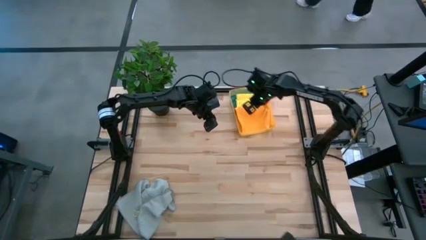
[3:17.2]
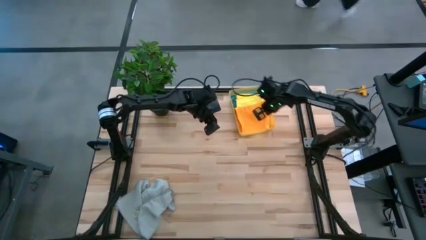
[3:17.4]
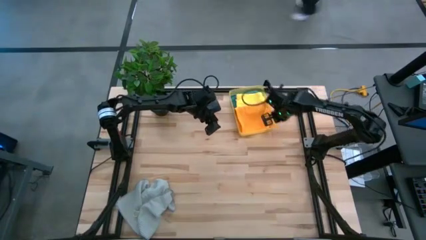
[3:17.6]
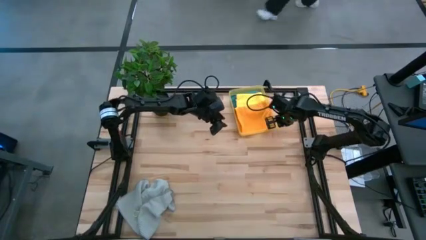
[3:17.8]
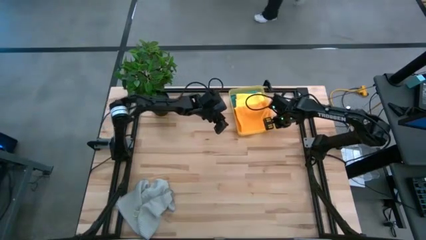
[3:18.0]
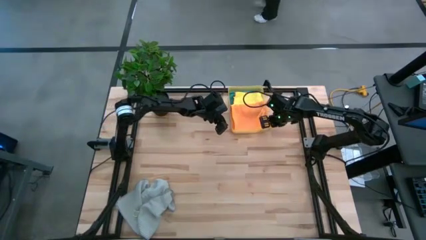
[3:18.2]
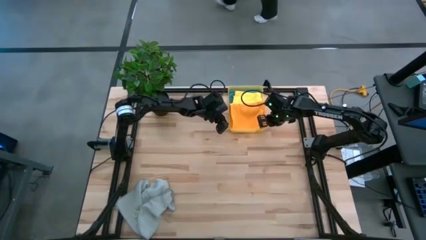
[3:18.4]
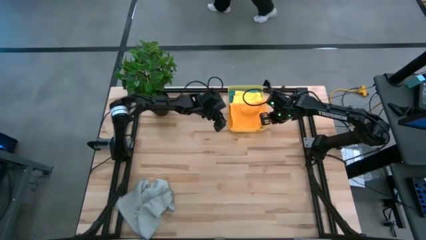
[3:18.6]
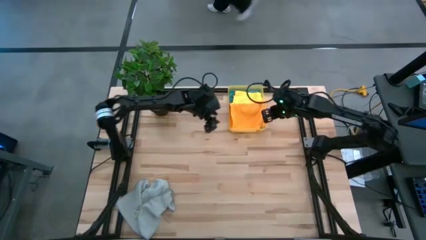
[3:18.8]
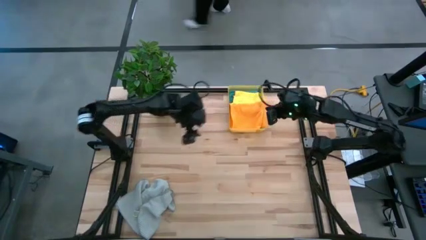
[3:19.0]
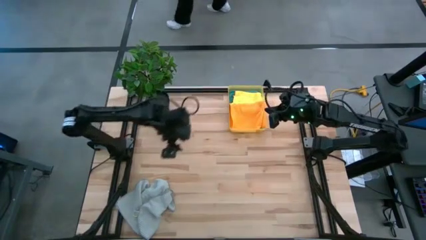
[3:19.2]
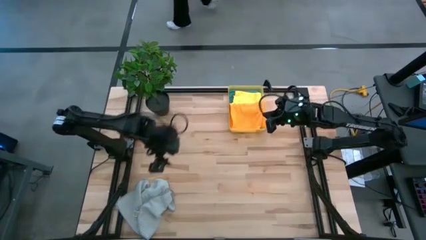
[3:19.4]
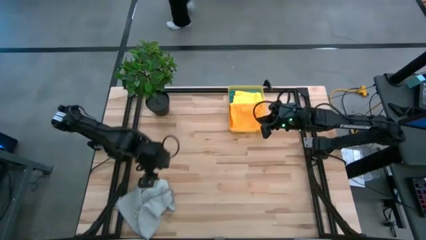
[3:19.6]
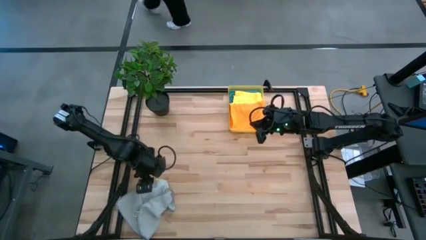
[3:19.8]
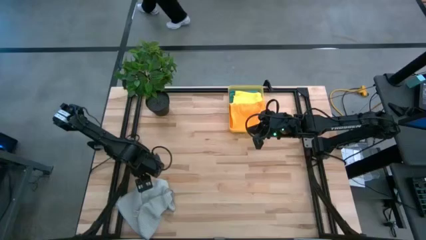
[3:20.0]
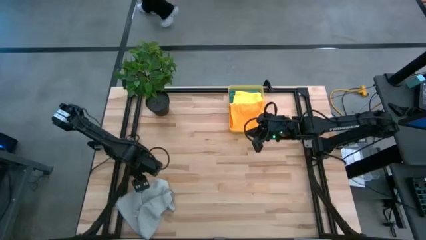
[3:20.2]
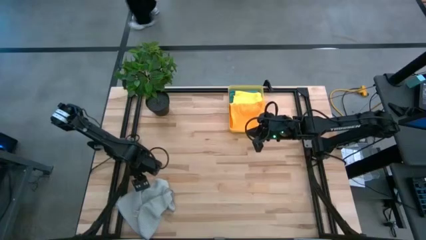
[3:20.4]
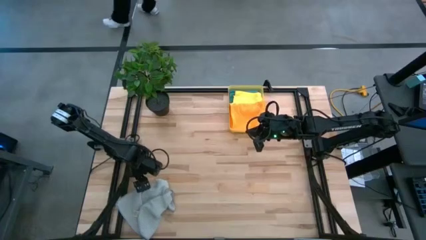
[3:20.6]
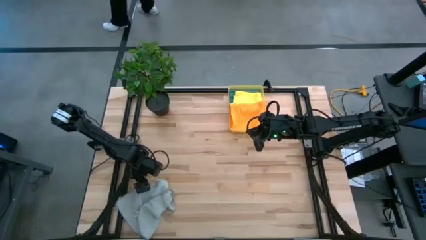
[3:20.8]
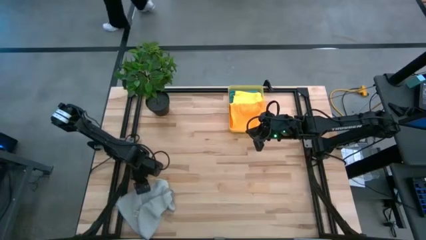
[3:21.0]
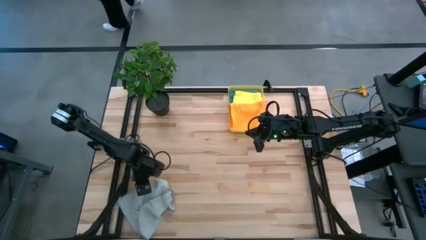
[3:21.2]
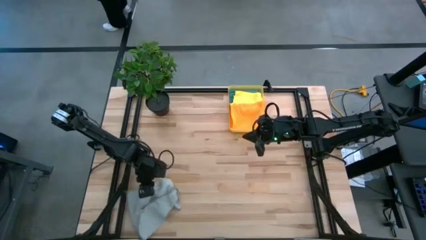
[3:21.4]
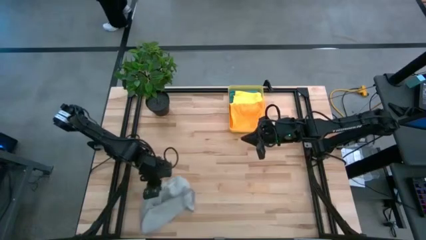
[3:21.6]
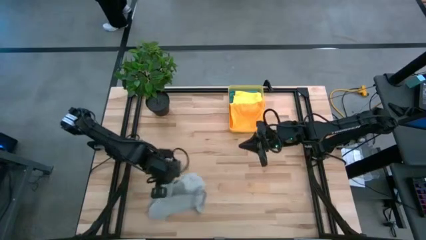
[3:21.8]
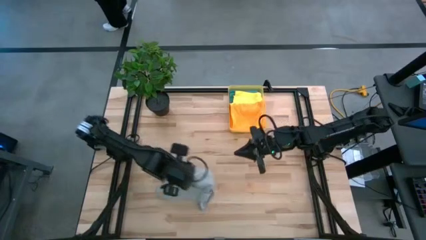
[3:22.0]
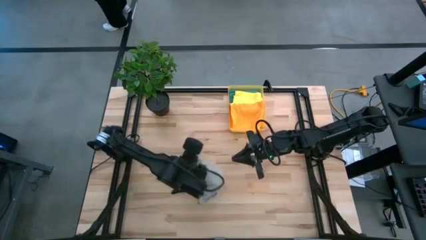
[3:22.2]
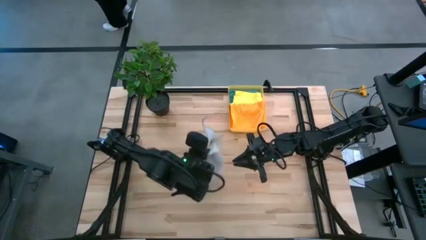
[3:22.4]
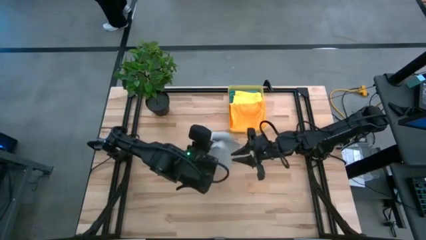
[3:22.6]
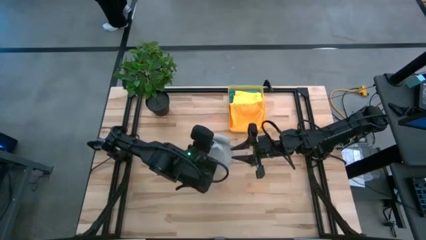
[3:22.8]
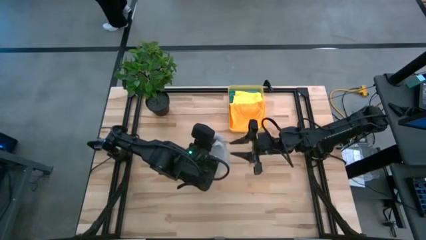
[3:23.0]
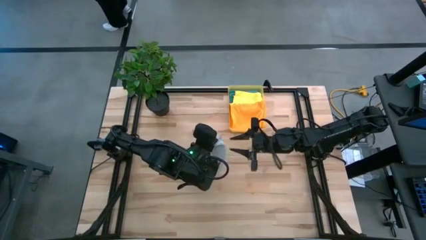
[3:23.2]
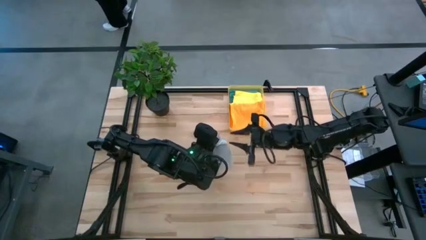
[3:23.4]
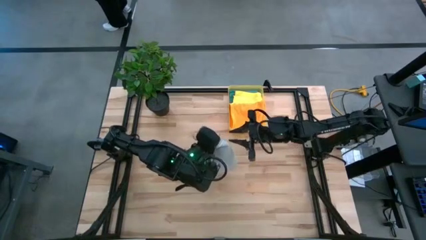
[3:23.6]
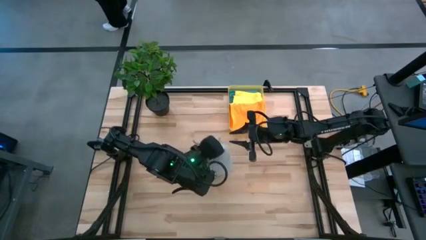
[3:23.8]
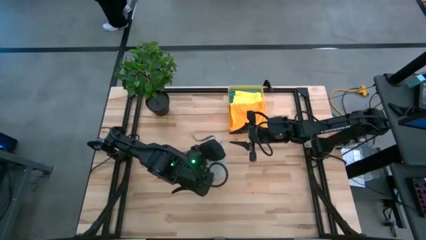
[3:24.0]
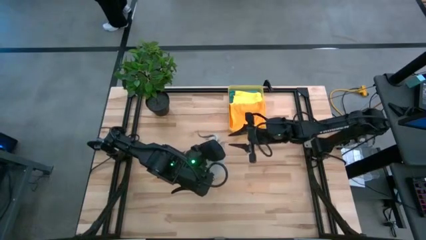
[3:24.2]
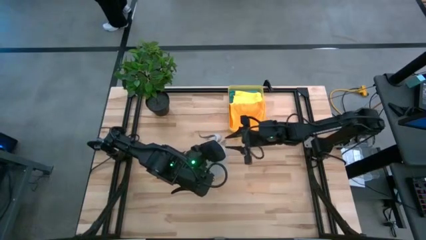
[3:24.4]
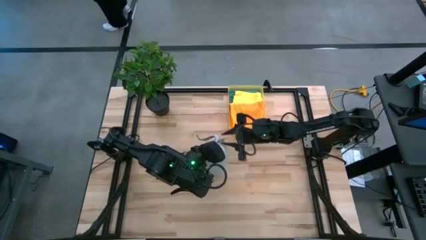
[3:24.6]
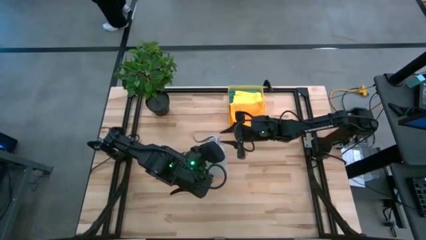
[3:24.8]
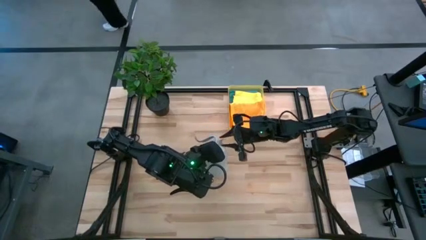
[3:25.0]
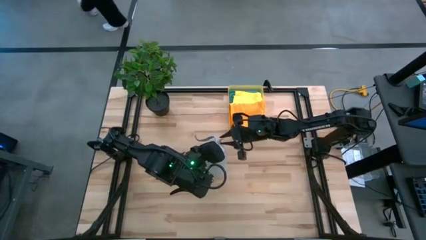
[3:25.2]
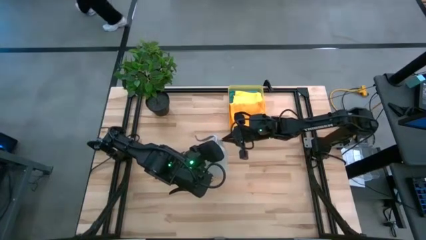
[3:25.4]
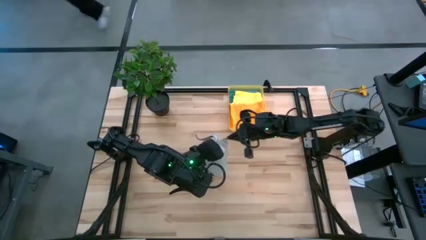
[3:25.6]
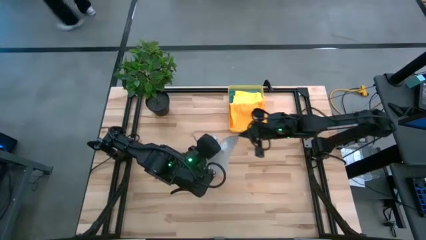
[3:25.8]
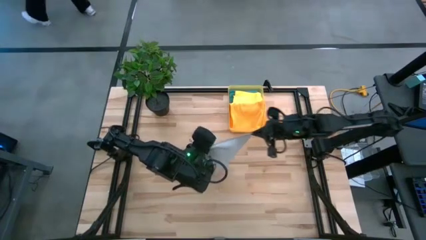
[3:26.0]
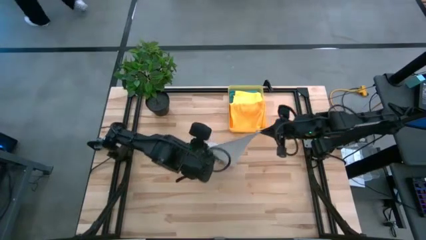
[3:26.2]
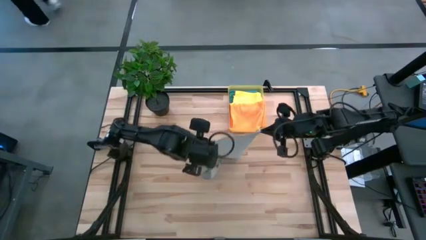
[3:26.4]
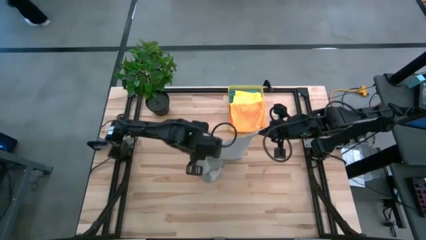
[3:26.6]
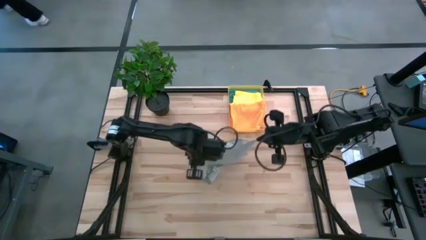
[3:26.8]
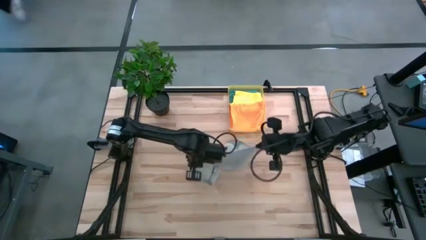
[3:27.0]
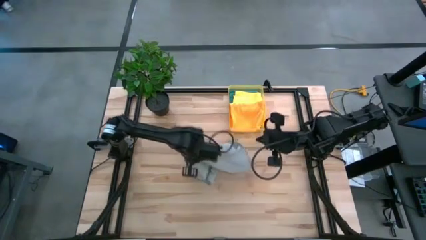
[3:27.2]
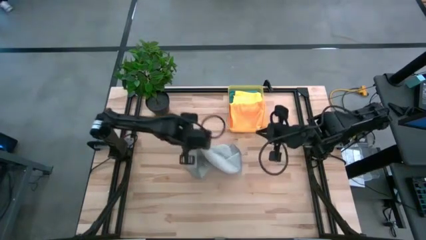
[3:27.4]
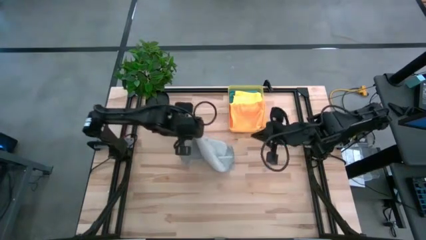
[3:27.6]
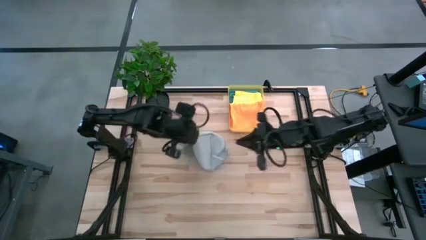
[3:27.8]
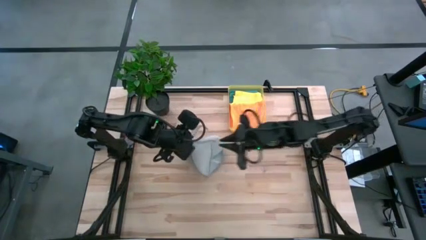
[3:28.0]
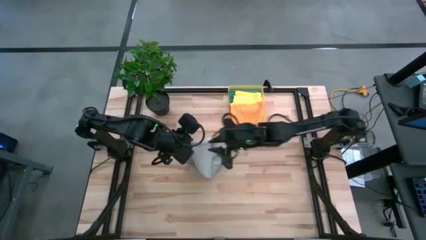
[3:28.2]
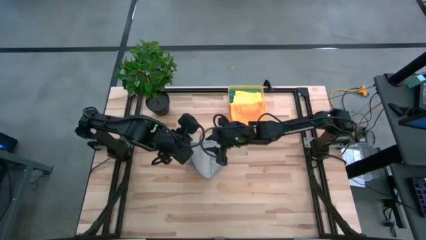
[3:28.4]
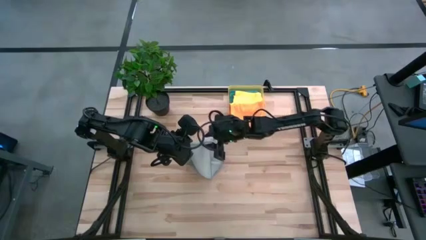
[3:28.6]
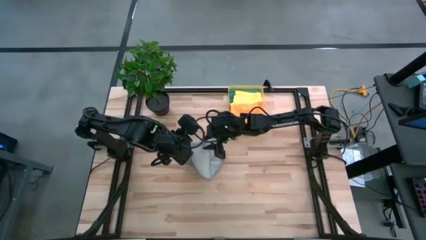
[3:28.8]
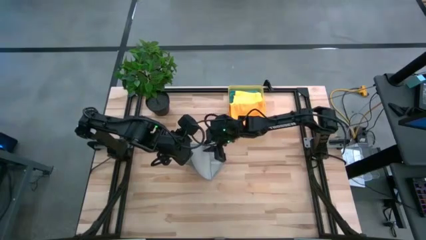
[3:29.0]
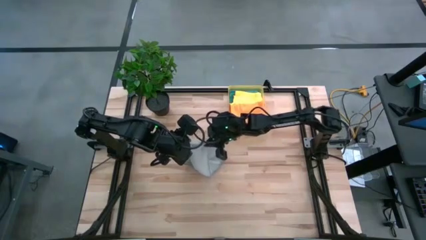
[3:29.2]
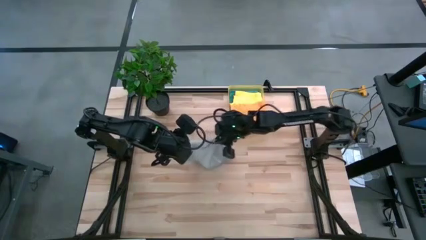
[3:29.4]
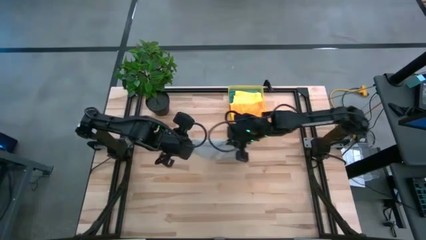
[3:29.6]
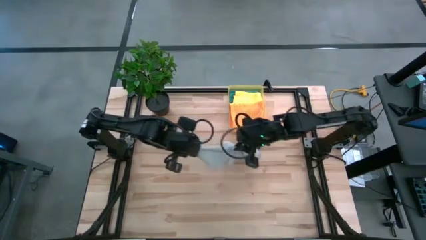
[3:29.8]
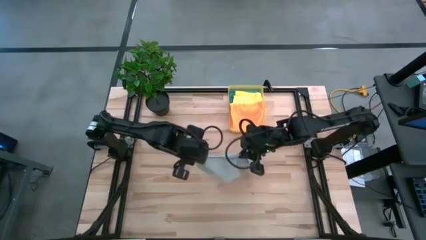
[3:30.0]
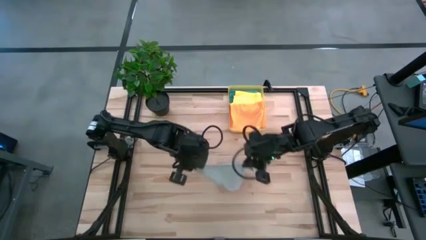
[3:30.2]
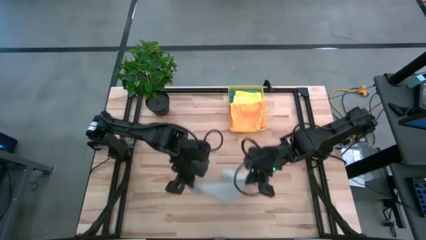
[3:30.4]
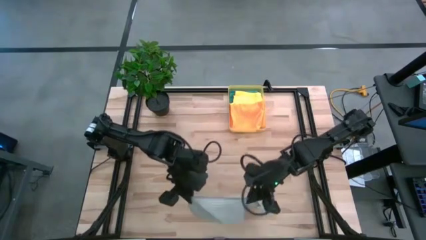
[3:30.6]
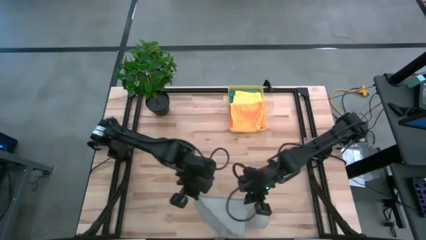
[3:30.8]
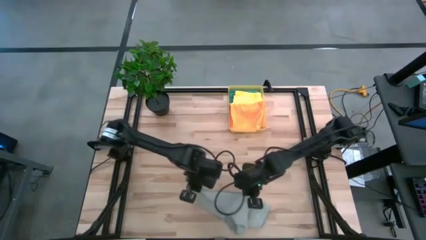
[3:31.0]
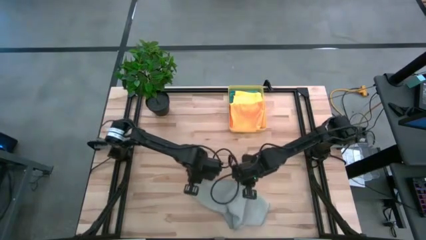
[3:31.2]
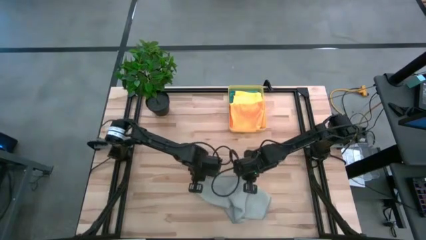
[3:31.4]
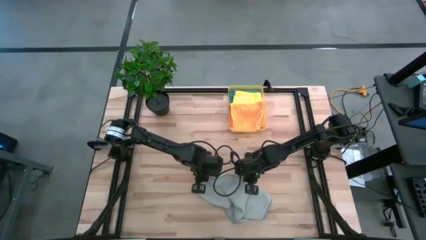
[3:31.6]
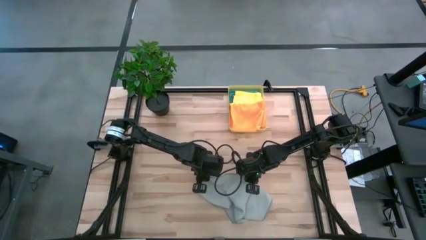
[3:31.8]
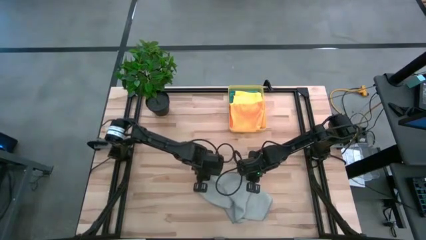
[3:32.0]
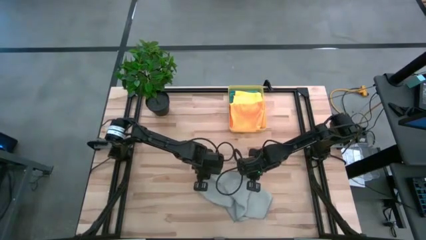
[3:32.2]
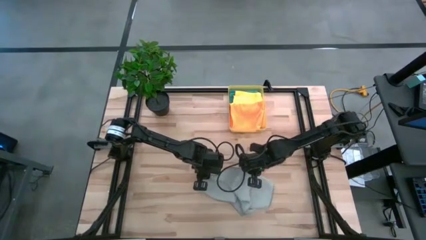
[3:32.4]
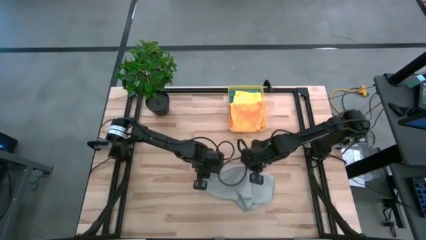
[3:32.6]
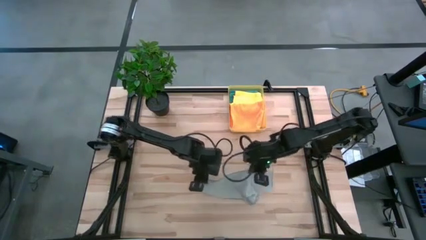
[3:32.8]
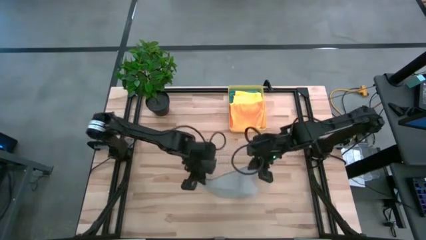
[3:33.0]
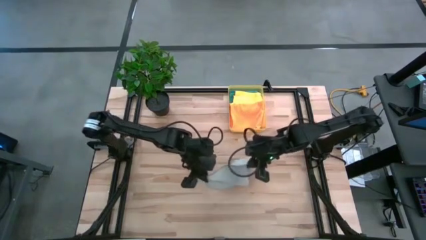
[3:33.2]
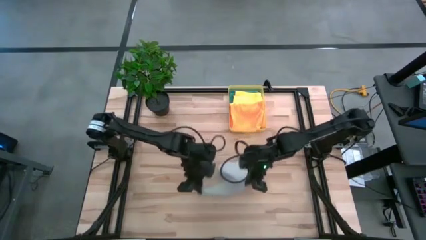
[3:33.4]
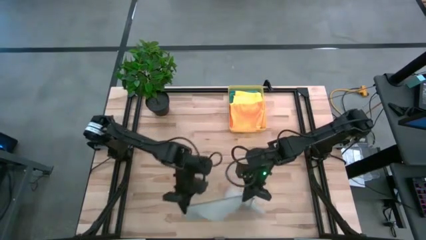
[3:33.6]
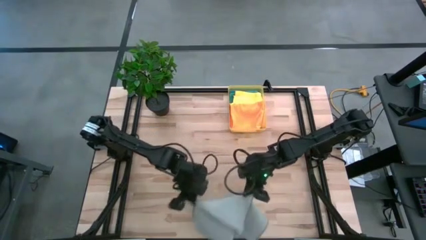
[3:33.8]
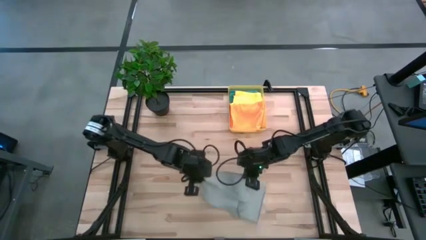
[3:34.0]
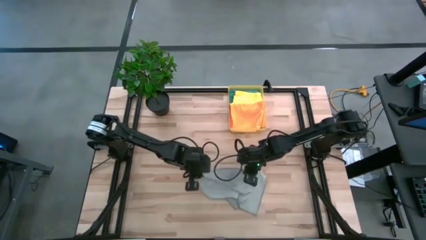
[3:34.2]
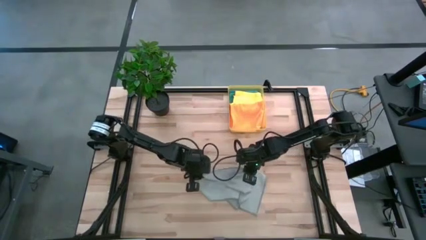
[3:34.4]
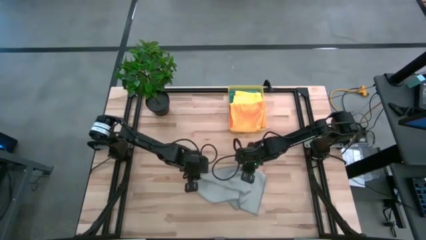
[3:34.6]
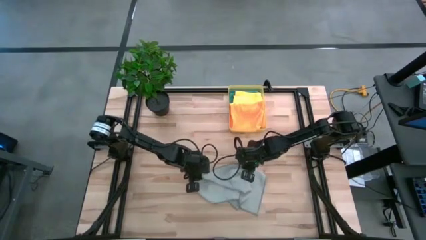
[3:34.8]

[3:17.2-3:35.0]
Task: Fold microfiber towels
Fold the gray microfiber towel
